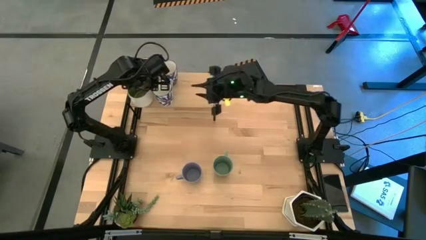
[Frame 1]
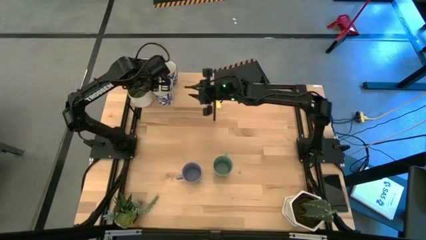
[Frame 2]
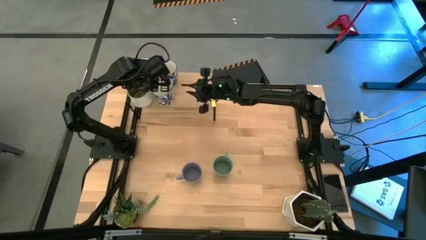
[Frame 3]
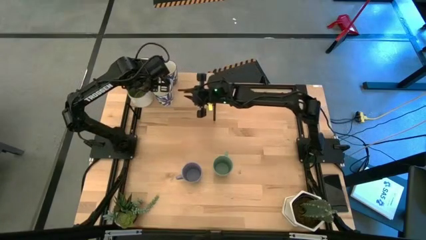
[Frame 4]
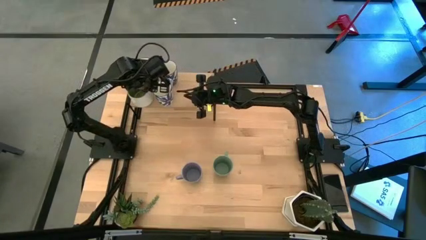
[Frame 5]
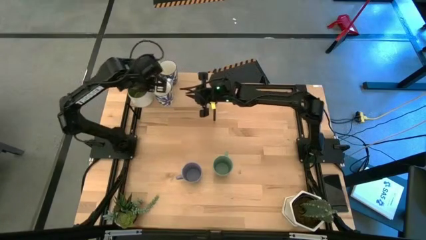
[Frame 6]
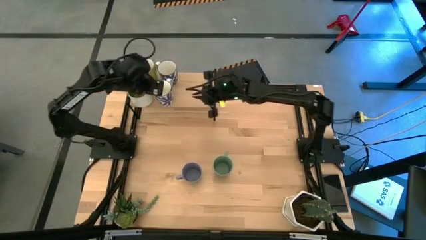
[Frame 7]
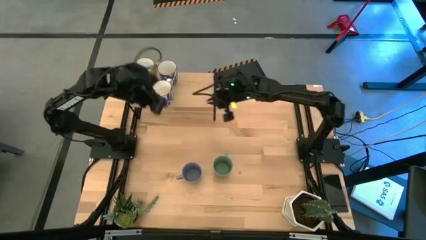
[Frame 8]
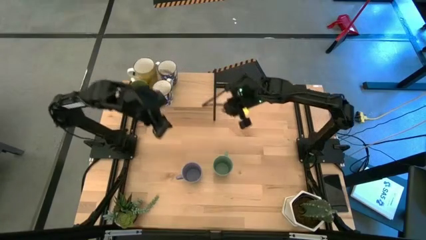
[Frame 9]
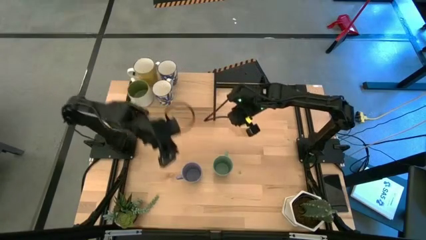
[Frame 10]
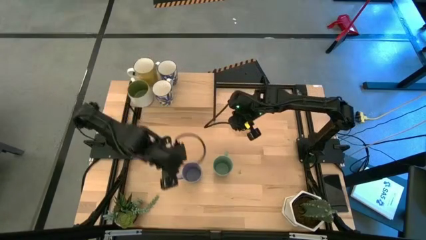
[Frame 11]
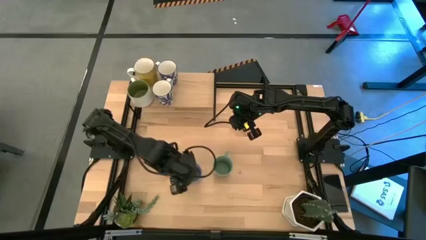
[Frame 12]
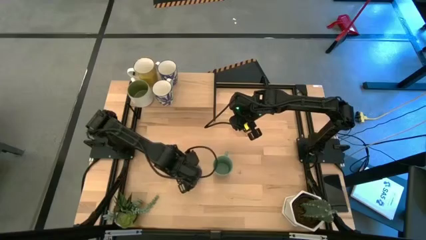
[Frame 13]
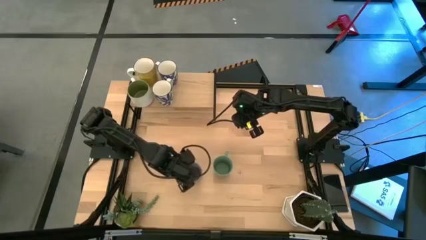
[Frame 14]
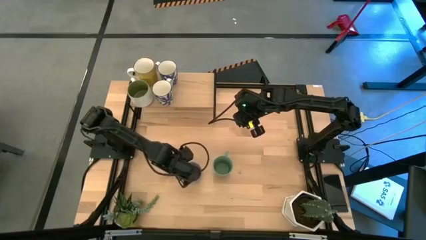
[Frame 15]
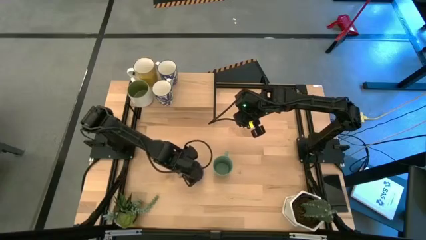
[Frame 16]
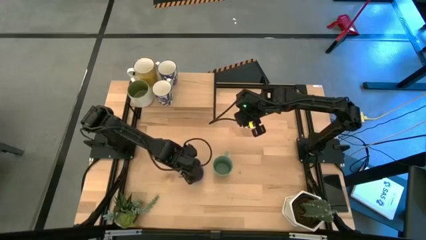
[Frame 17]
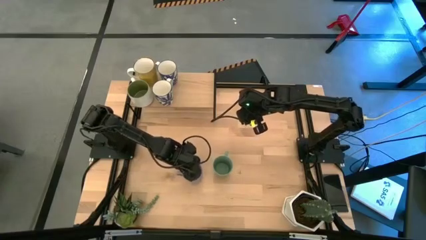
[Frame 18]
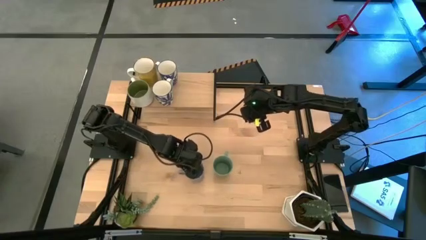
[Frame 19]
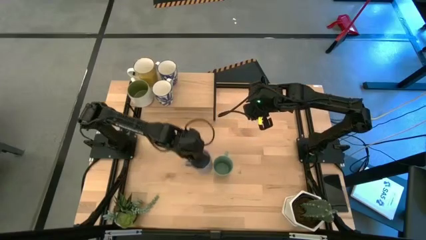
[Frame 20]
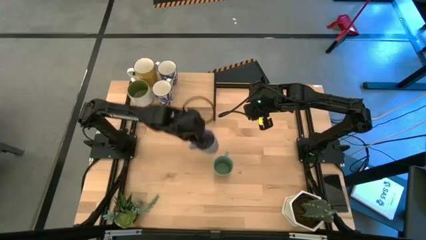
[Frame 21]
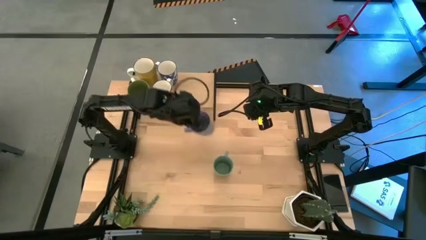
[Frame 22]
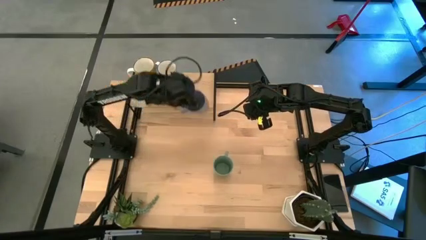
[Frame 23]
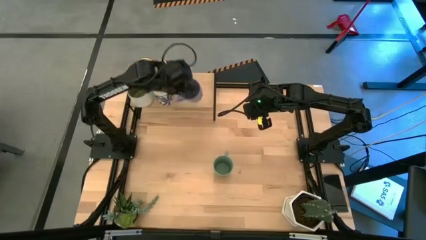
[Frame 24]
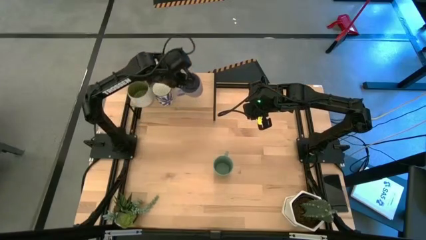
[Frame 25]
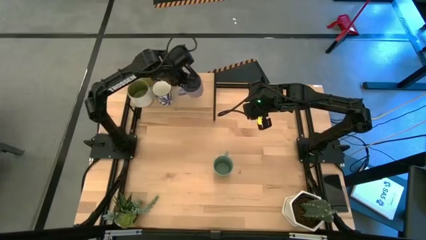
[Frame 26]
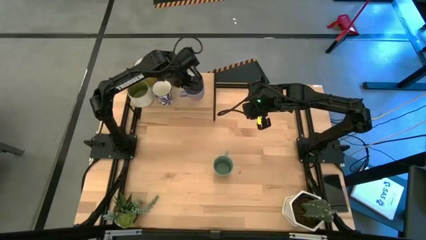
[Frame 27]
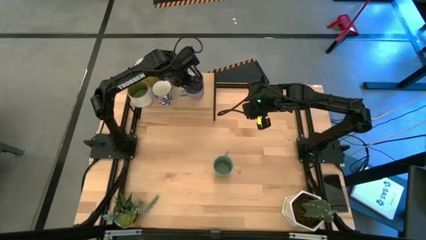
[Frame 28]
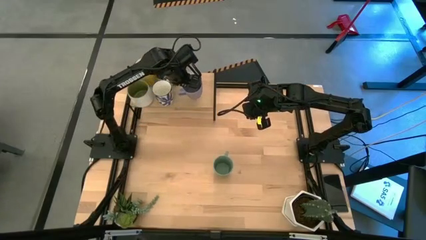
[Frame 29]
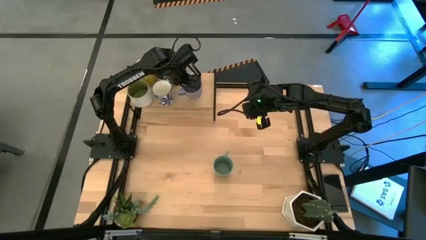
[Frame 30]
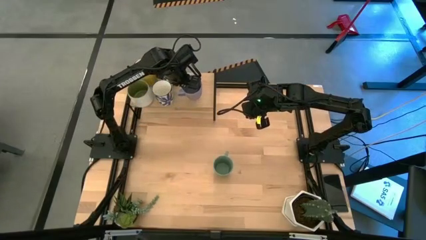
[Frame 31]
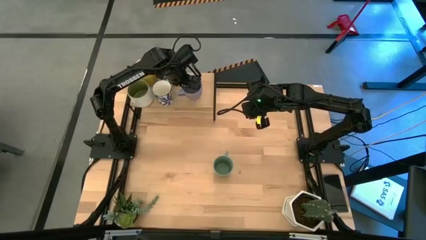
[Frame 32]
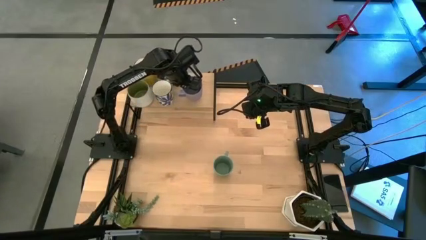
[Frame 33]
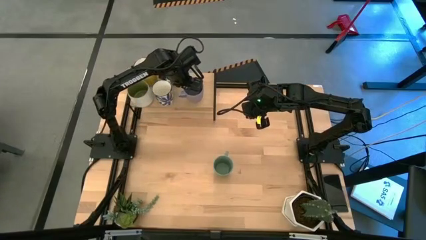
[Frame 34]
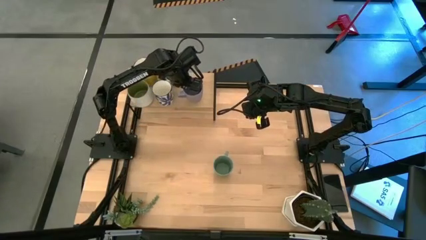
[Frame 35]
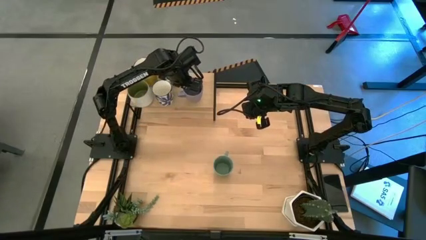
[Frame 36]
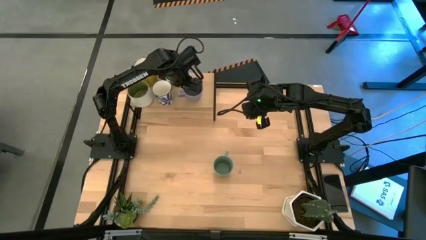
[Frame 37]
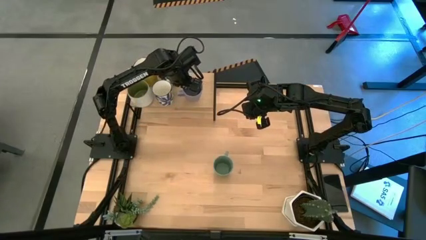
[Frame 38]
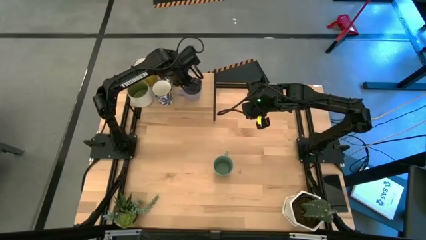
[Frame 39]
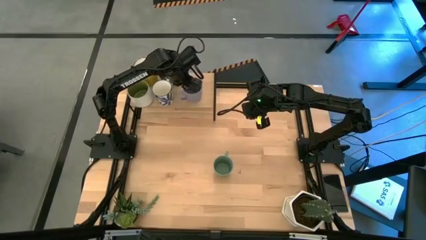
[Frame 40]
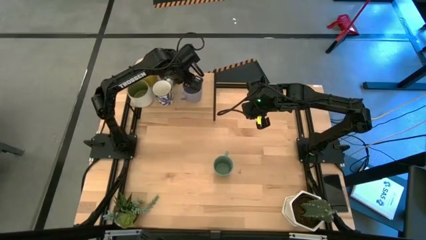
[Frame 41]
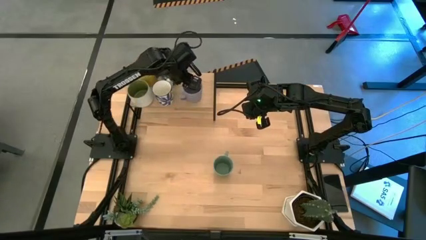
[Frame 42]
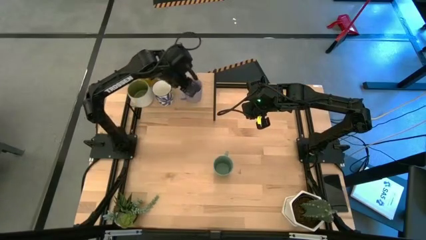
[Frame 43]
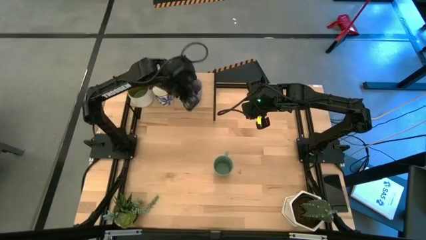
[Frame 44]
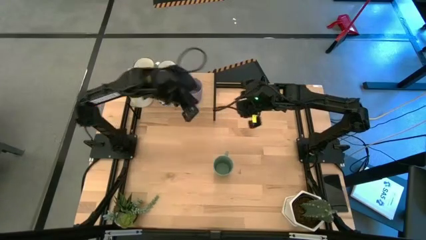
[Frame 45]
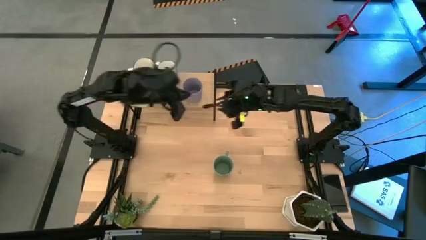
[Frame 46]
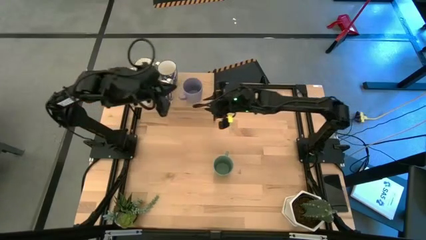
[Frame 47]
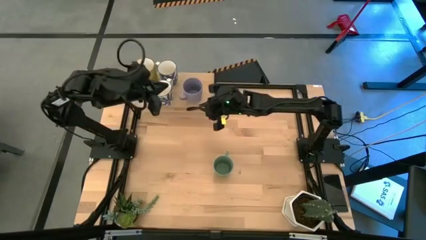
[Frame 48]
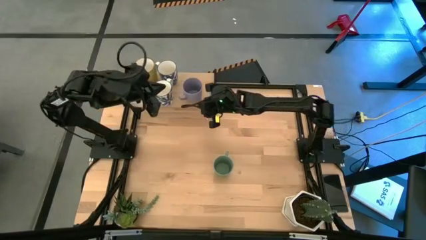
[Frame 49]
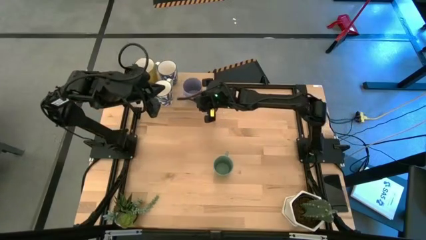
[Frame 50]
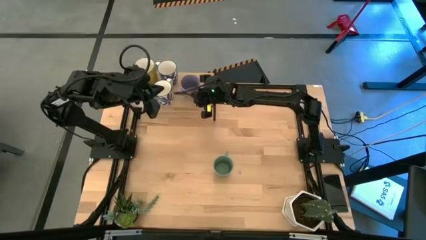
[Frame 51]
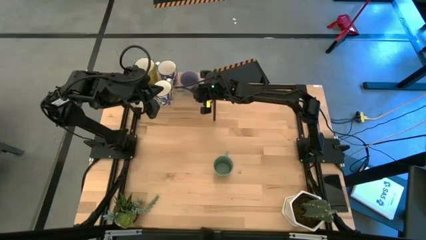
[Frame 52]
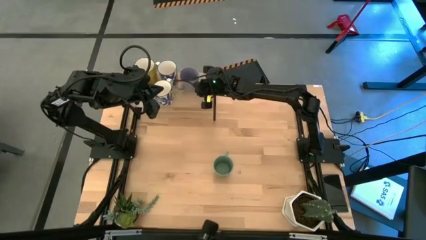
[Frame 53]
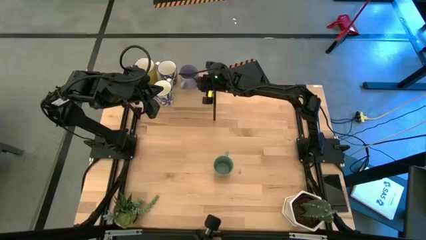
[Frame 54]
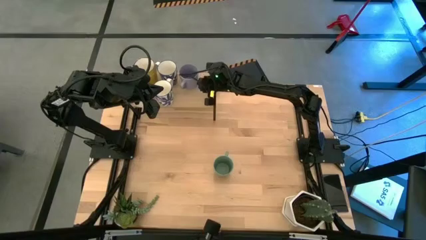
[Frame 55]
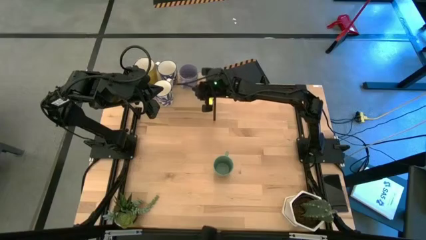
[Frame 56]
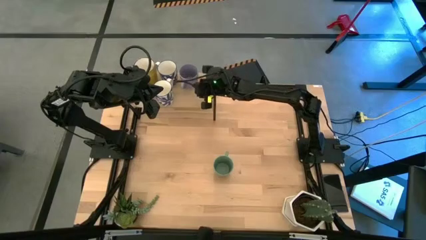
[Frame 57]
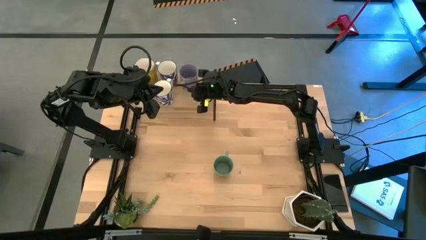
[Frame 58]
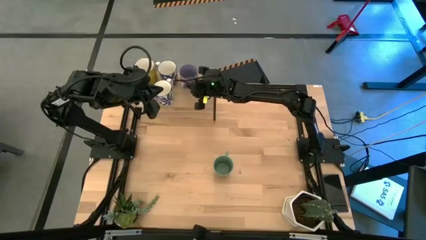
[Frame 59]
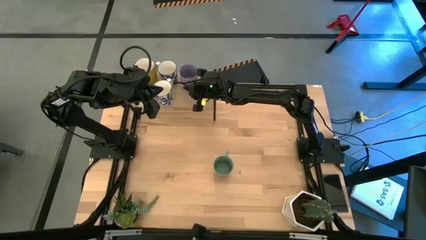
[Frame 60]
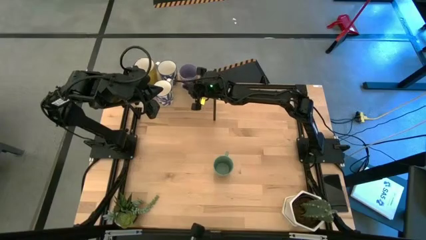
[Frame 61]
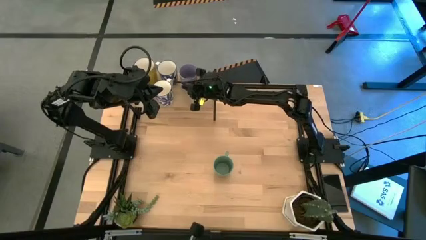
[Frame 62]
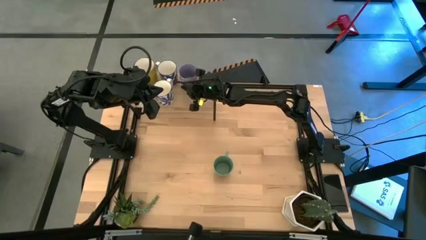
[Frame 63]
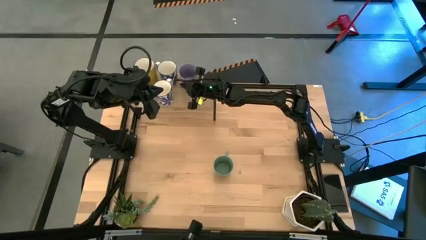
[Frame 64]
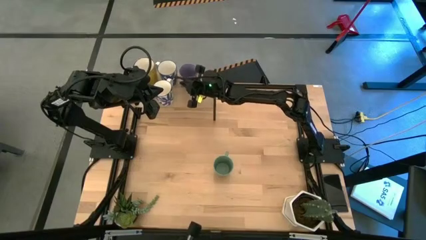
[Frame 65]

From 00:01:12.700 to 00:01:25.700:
Task: Place coffee mugs
Put the purple cup on the shelf

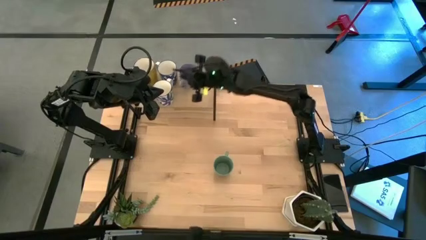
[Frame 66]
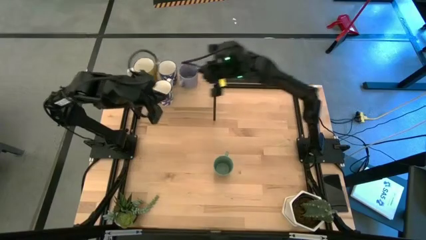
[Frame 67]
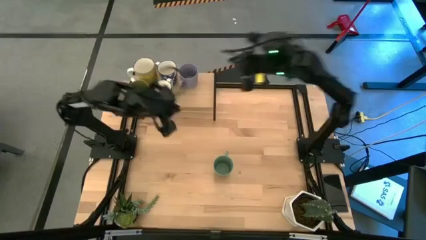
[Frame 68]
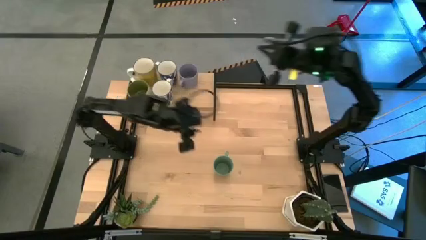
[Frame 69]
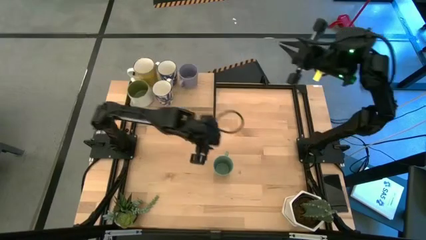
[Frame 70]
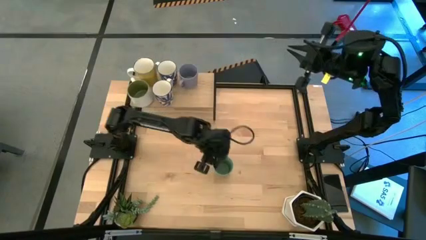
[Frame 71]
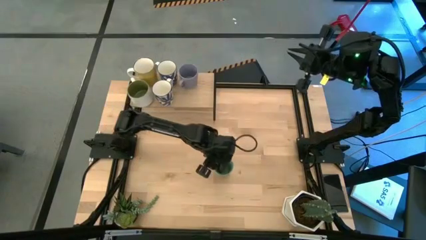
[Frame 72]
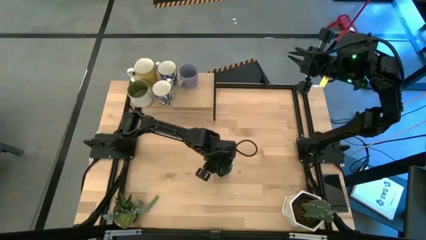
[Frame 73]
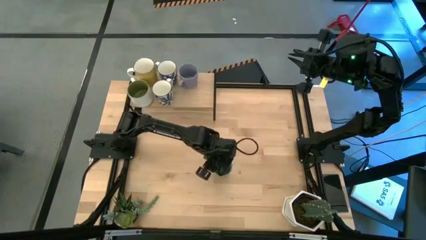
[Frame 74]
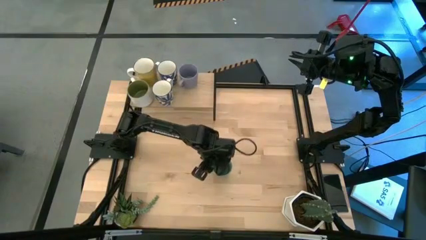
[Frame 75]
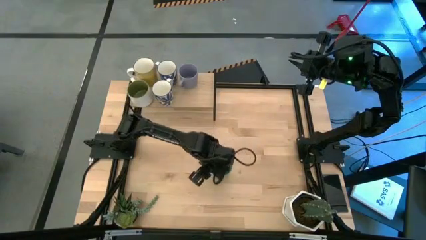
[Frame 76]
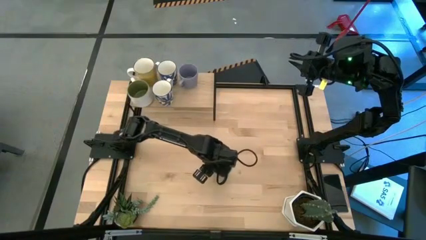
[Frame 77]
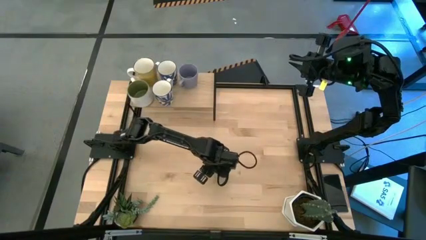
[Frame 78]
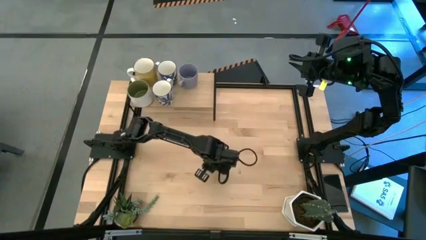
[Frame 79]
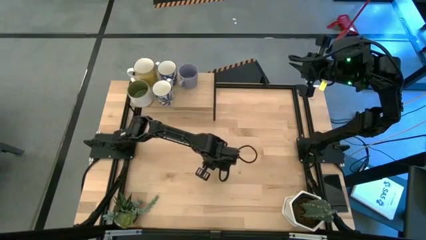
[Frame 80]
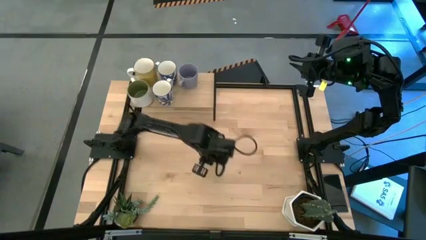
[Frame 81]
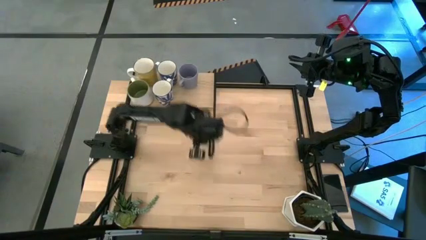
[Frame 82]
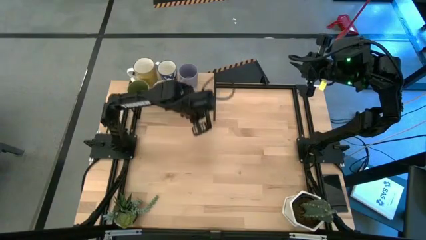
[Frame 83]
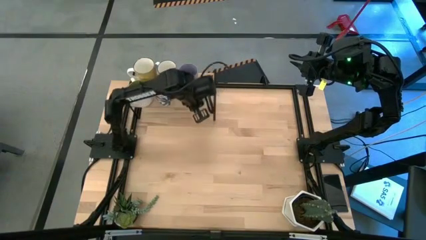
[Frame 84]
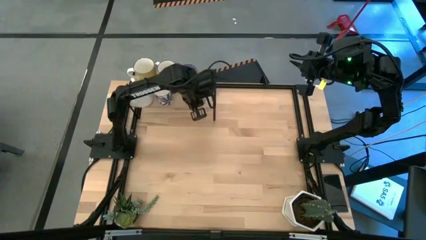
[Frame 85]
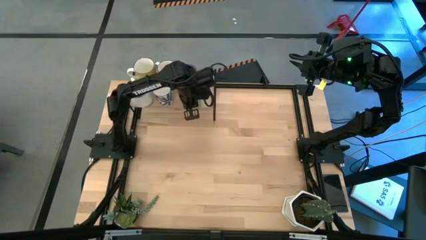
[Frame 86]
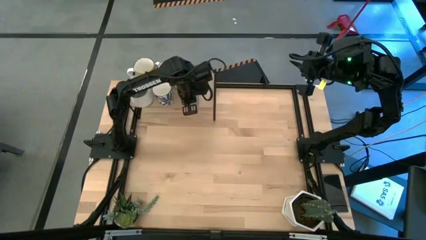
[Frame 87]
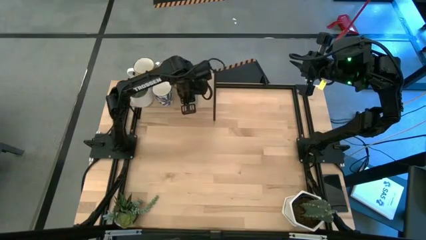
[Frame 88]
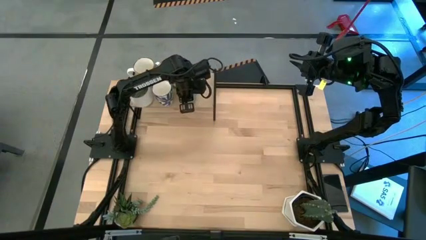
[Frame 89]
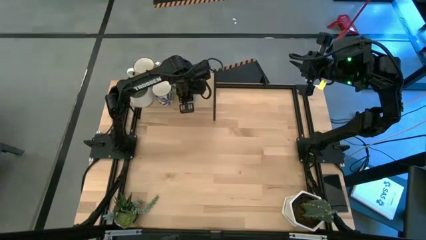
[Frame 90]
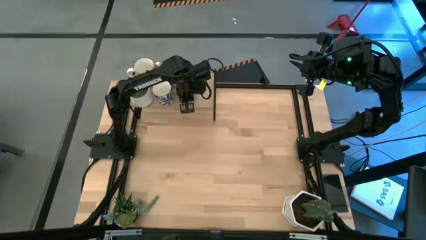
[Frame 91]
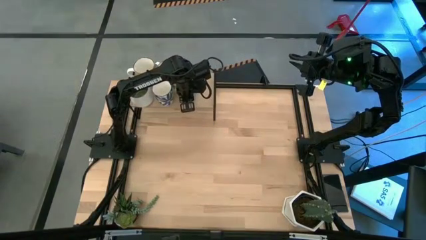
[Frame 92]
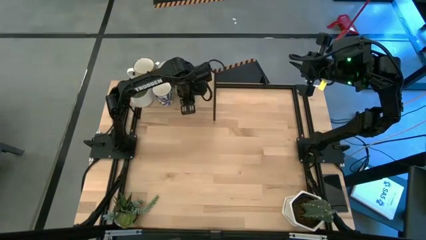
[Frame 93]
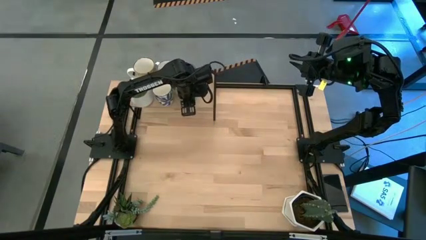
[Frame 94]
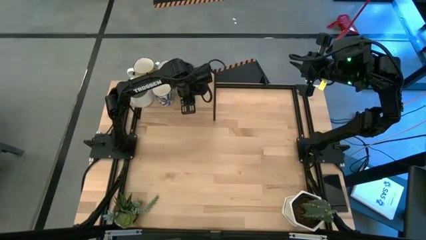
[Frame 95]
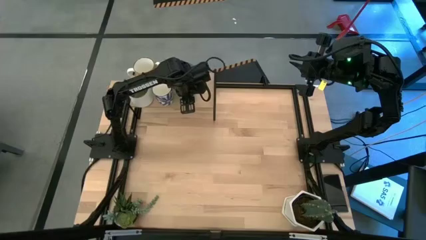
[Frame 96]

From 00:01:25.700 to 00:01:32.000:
Put the green cup on the shelf aligned with the other purple cup
